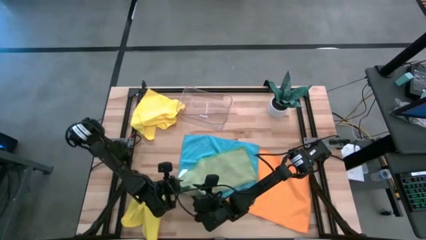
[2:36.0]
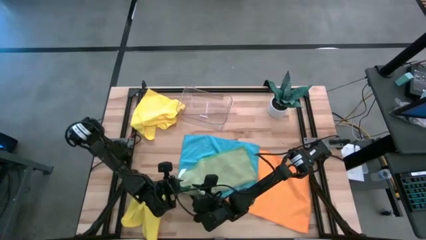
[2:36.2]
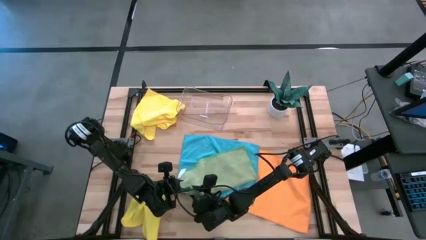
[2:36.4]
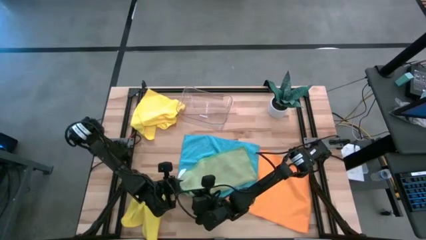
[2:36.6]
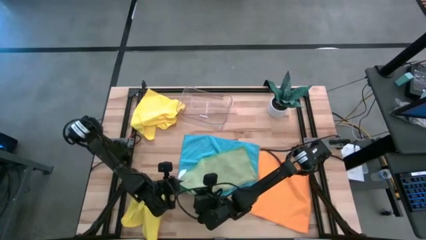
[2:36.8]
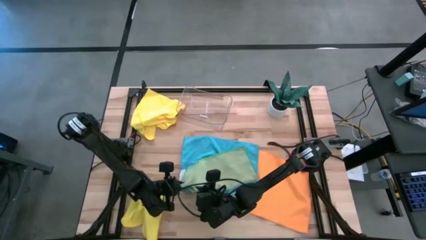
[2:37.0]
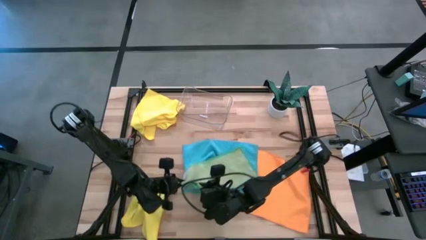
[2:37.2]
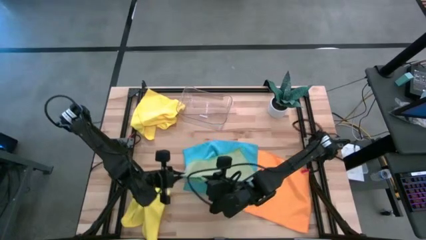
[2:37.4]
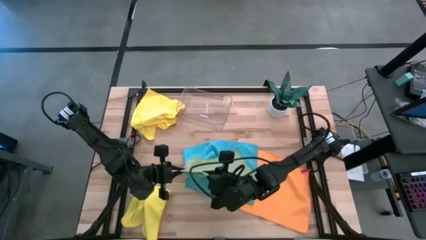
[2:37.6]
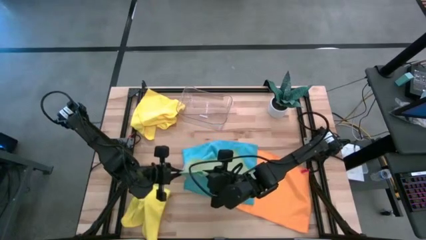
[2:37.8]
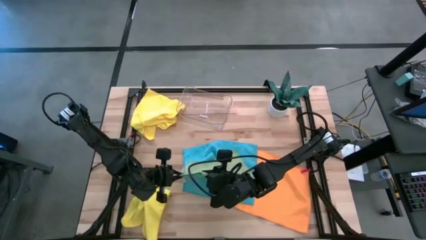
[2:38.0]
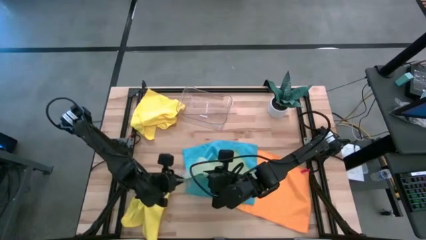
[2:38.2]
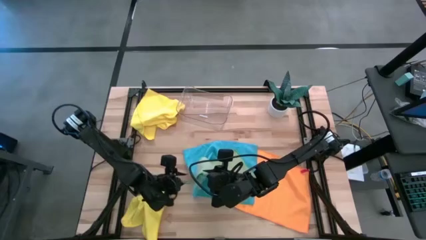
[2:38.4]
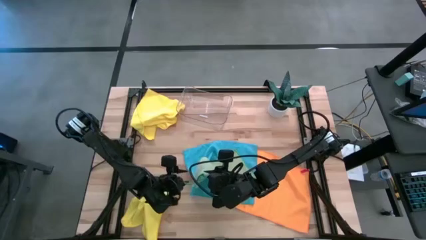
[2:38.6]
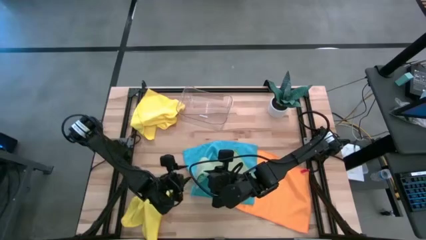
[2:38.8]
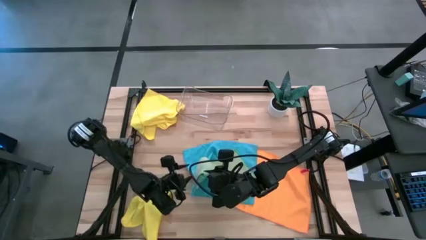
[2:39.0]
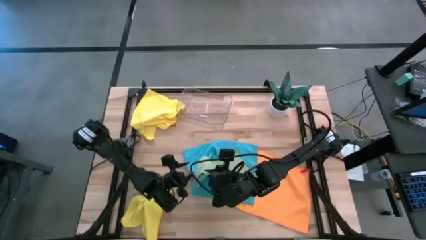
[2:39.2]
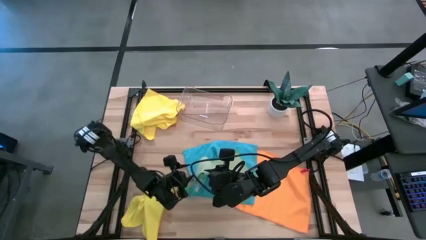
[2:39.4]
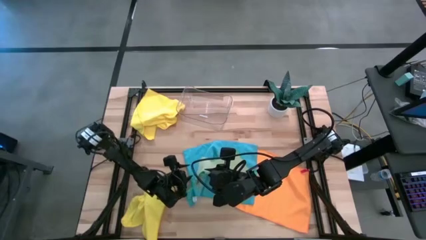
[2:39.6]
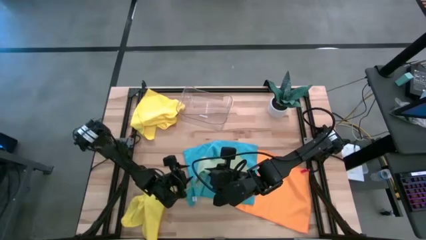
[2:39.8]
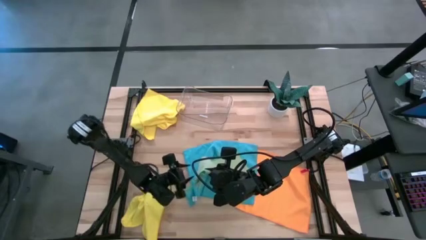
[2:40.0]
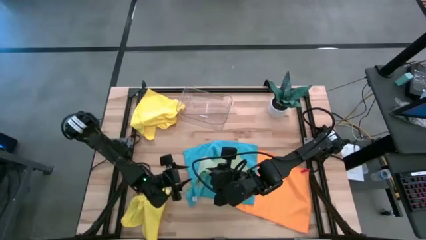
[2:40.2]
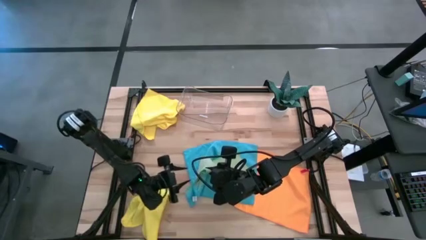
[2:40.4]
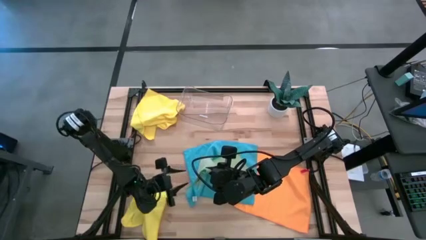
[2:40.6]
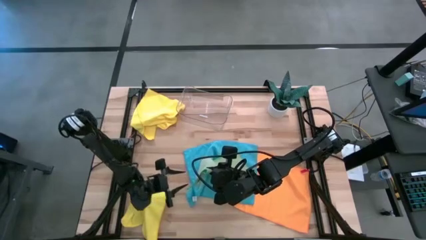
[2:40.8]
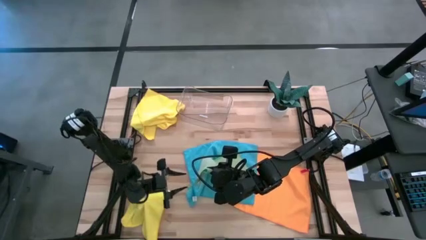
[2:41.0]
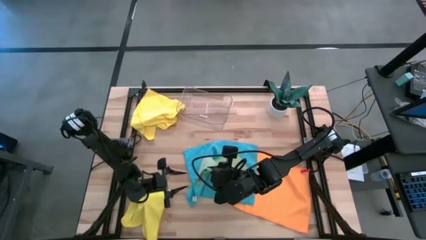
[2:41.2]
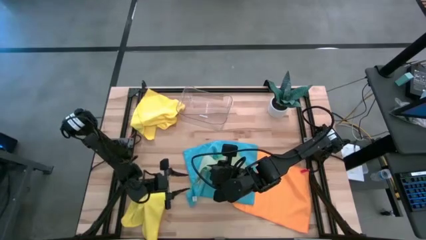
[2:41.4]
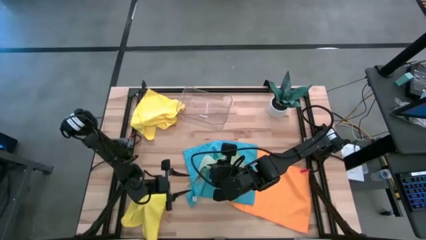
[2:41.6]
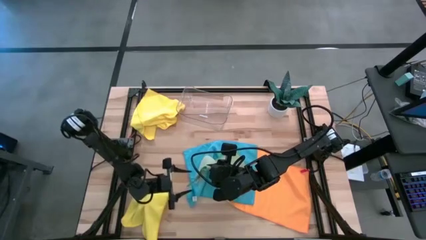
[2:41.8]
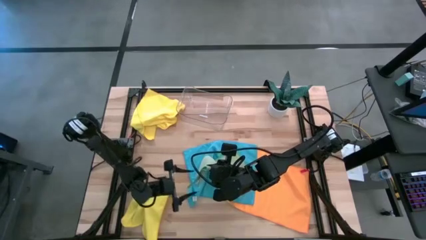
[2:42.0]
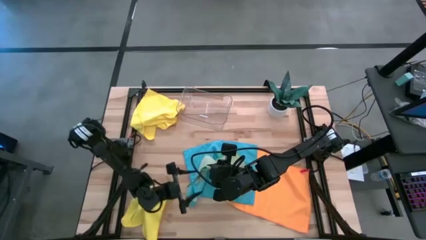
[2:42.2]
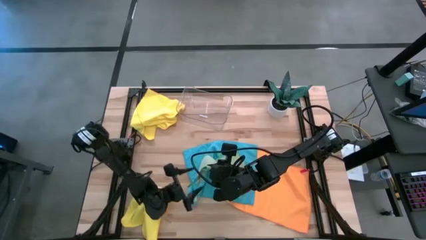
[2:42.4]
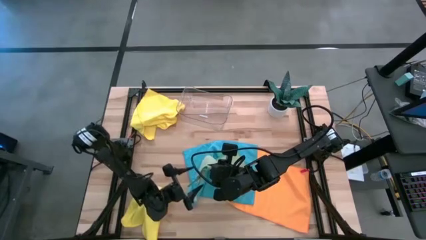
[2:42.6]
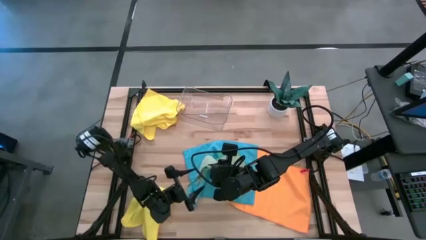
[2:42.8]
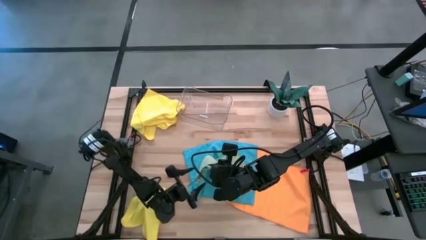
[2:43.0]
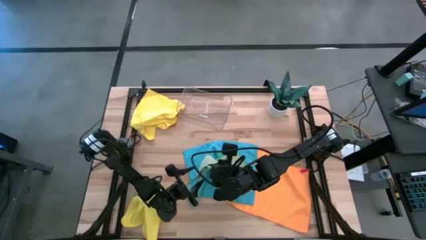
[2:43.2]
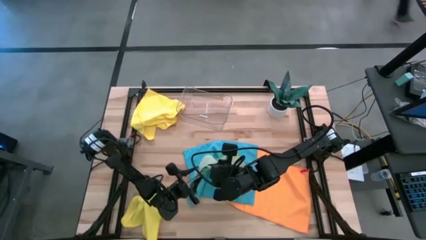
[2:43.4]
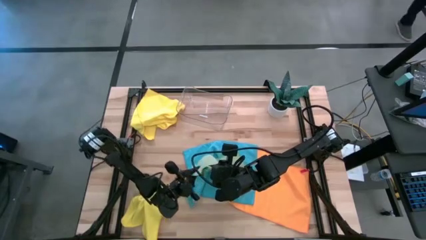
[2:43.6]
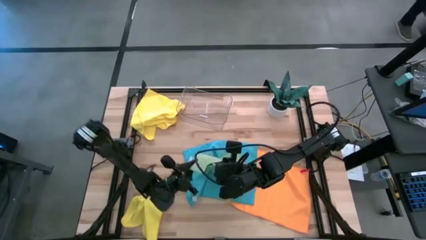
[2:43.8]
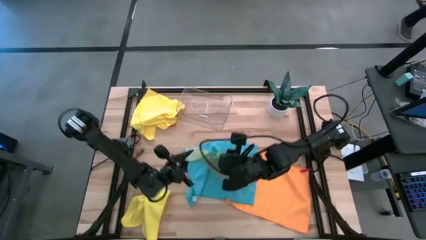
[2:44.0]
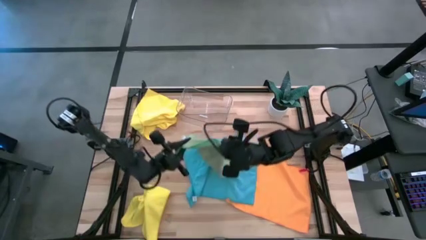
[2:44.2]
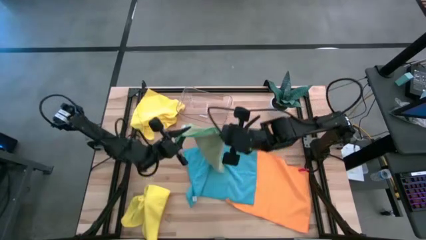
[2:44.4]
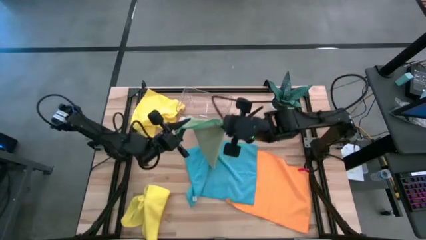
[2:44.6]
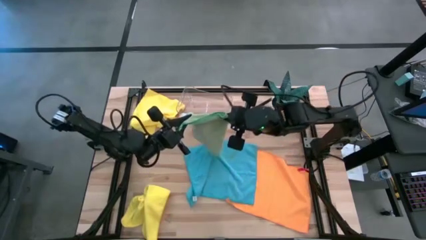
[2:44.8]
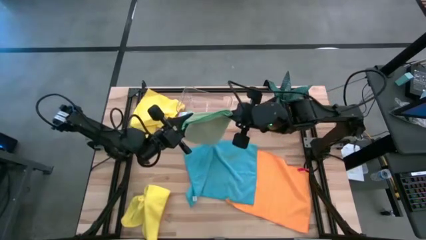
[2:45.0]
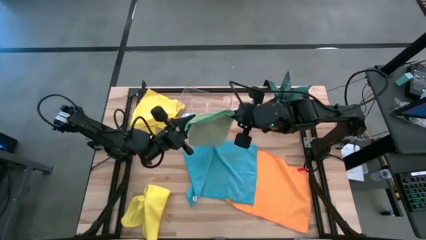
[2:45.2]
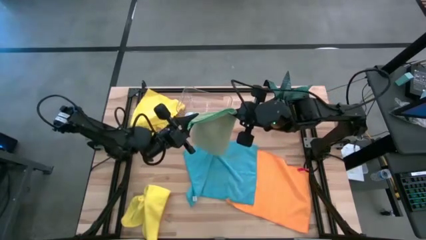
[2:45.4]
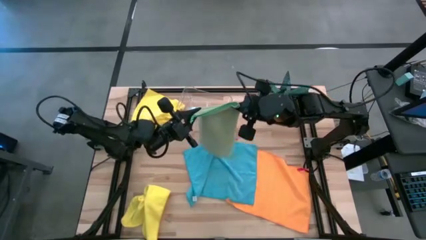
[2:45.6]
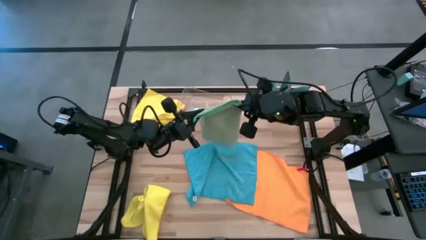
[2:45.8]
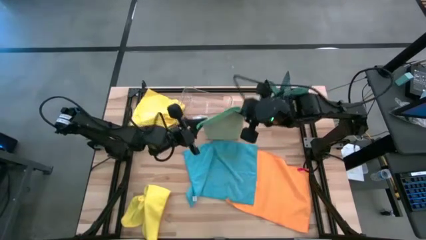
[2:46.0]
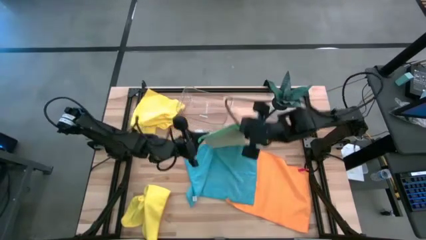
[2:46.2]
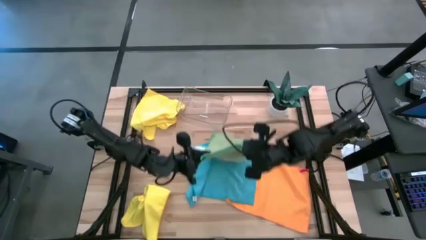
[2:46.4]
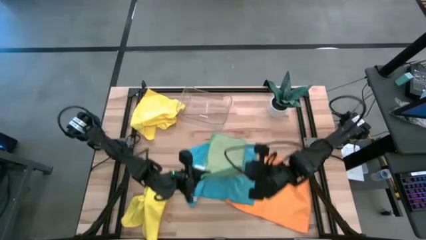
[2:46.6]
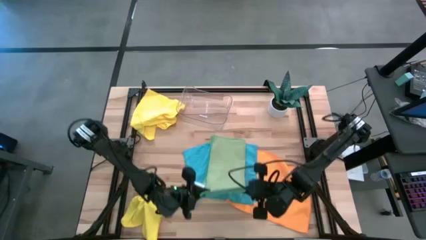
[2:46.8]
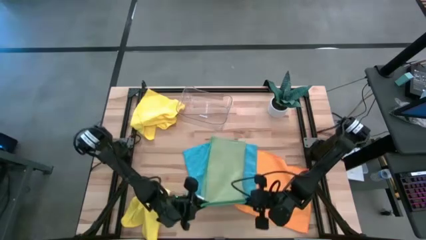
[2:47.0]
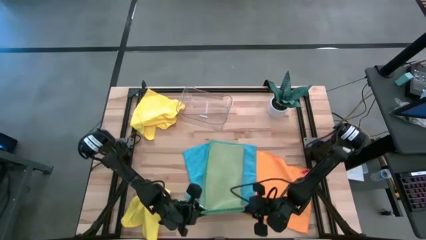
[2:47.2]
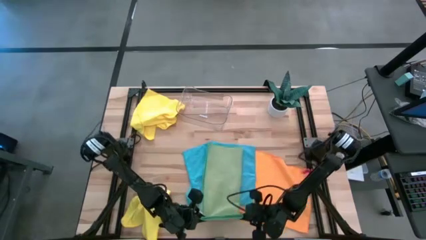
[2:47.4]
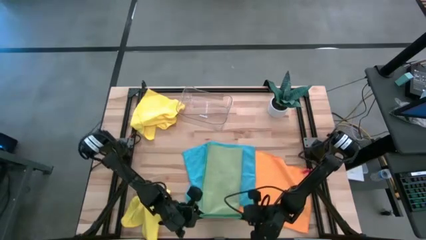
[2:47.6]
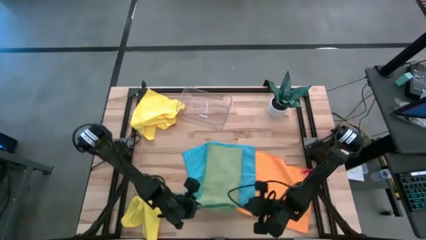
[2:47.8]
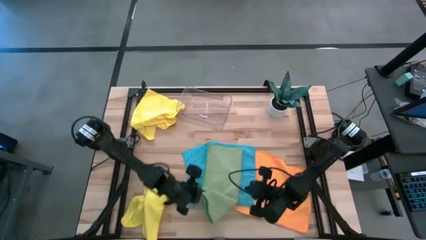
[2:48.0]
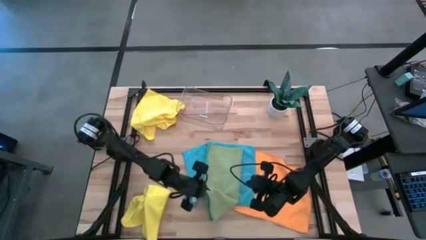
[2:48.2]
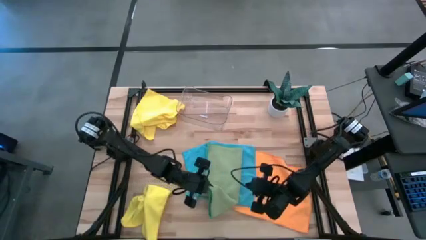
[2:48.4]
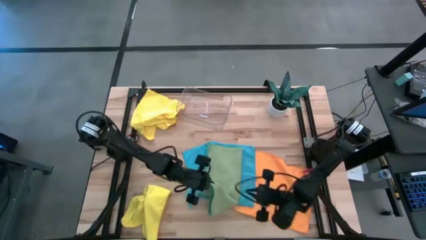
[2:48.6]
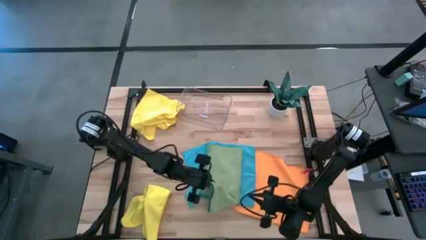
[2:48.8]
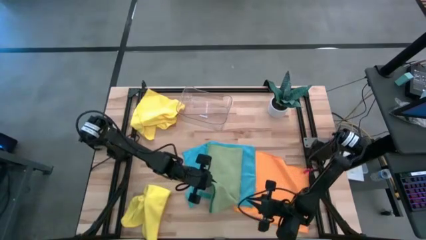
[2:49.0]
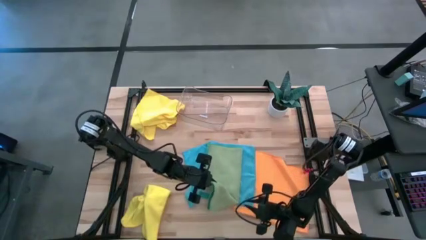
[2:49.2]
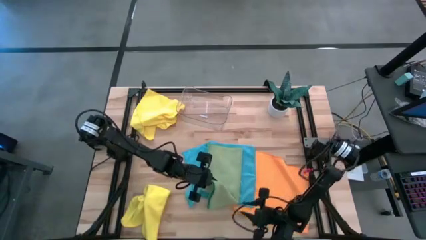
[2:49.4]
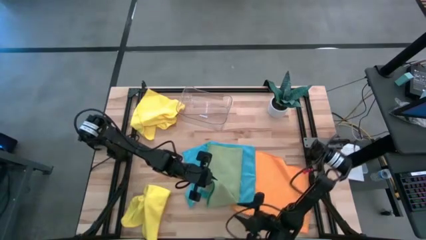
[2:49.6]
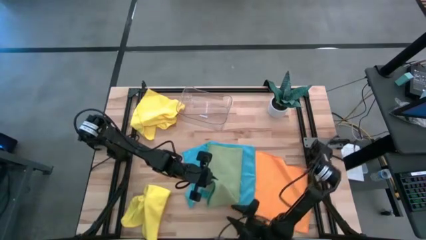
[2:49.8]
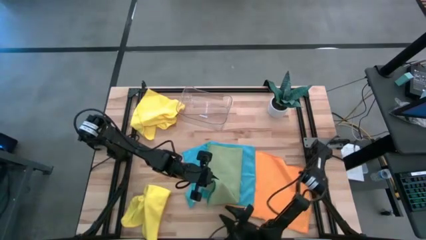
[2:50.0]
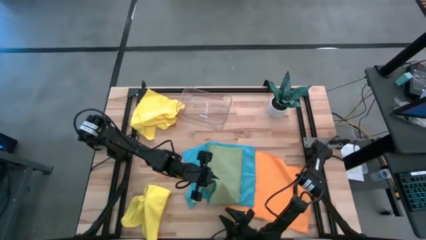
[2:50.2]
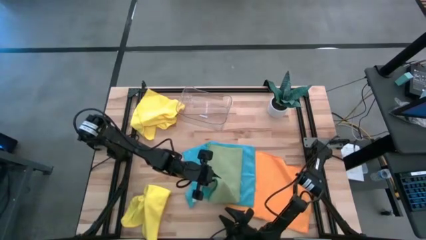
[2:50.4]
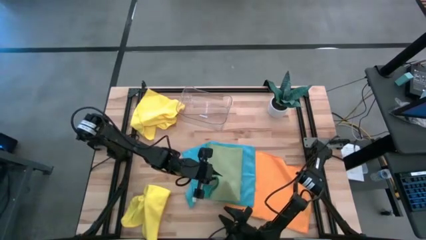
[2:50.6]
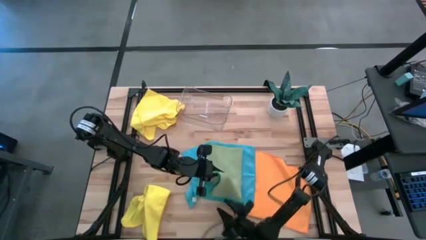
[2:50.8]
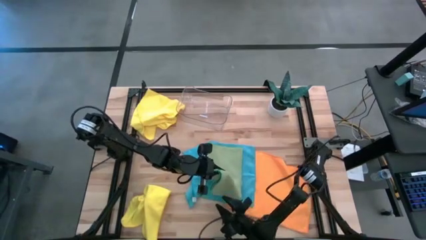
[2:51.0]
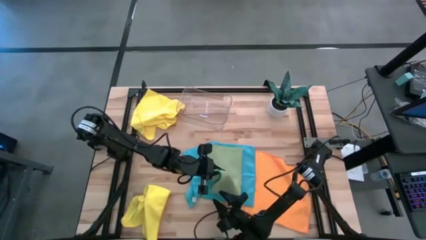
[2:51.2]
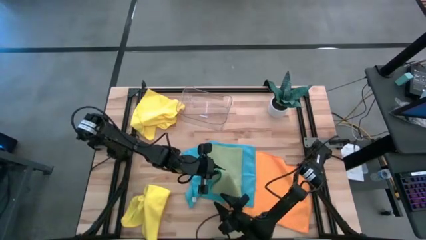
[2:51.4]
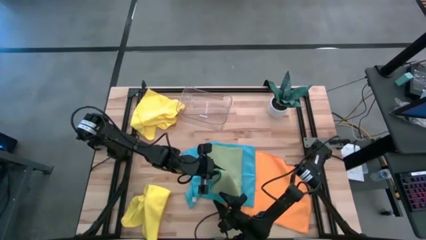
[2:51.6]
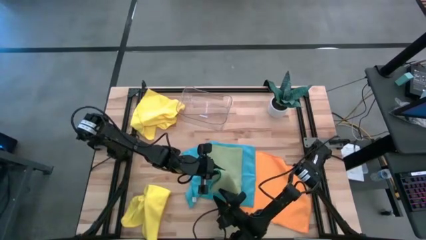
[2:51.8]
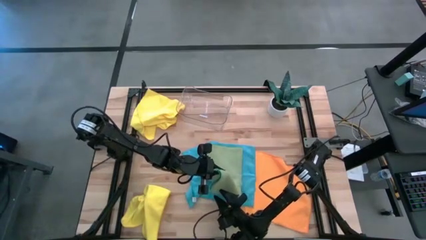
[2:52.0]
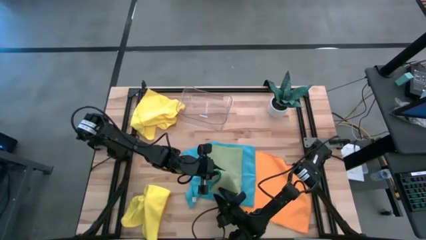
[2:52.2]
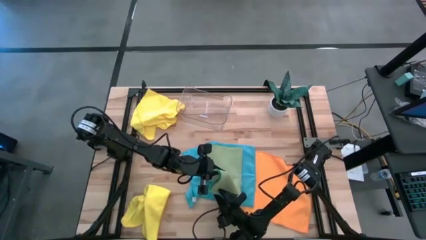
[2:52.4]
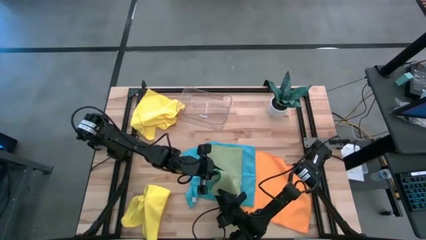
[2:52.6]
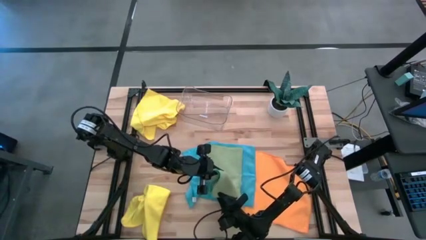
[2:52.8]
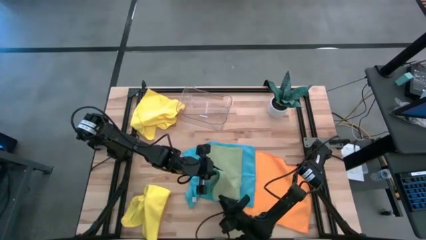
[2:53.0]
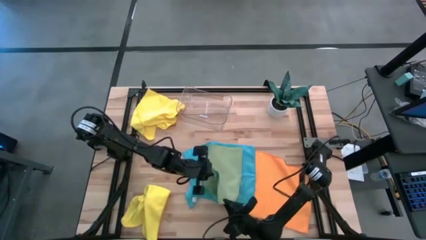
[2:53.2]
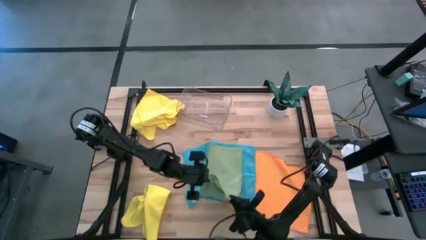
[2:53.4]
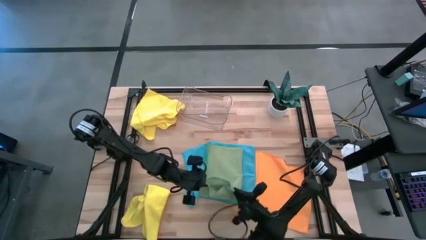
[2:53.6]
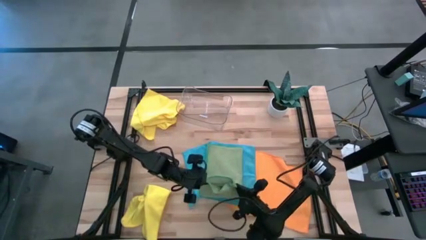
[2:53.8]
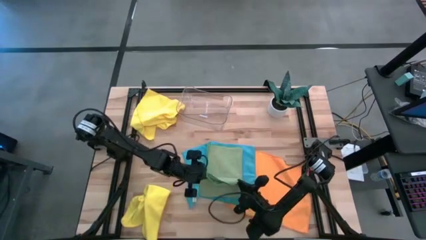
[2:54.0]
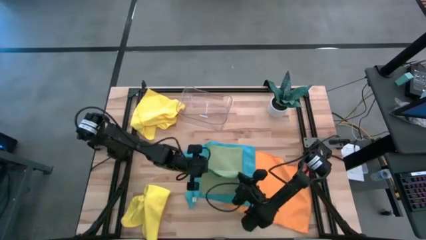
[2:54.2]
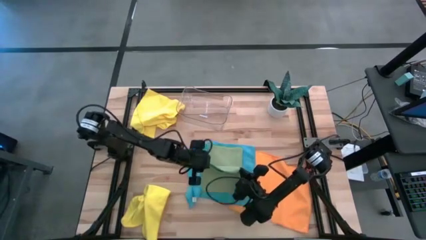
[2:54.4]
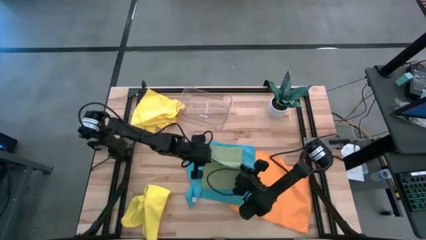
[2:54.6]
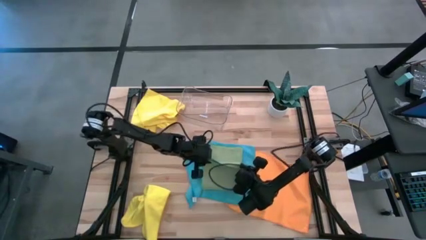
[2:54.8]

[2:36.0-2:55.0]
Task: Fold microfiber towels
Fold the green towel
